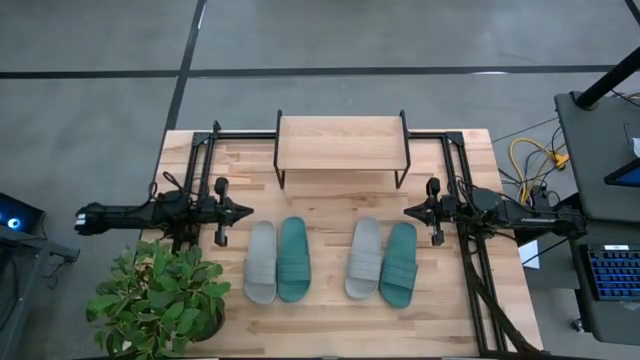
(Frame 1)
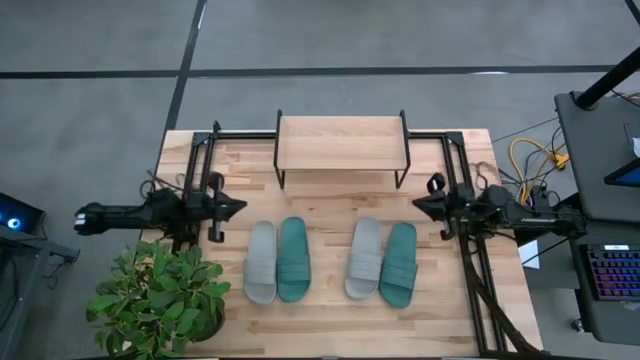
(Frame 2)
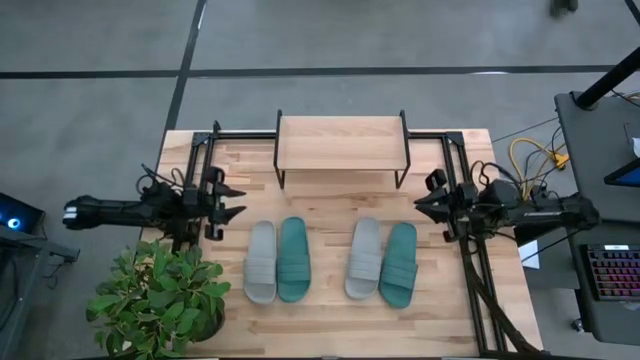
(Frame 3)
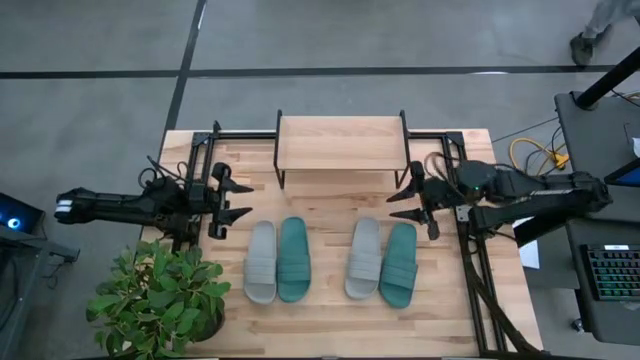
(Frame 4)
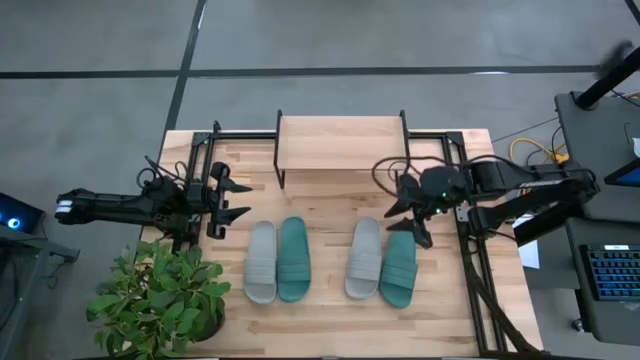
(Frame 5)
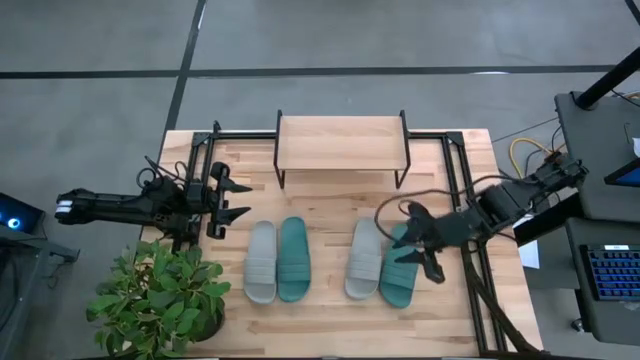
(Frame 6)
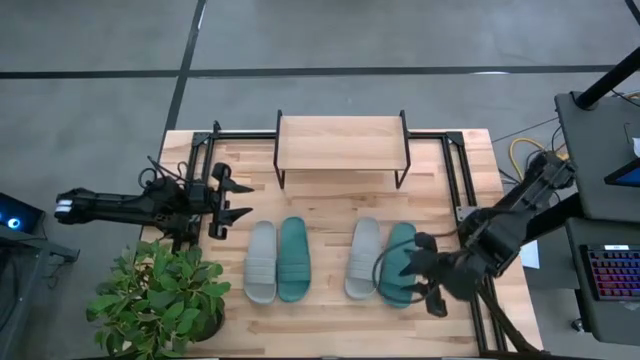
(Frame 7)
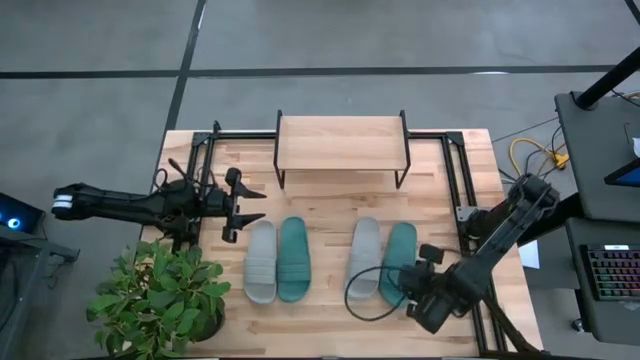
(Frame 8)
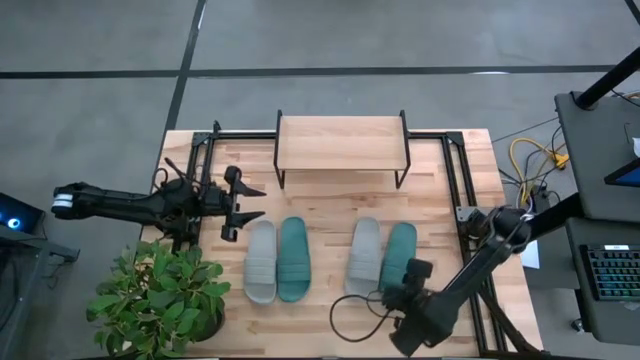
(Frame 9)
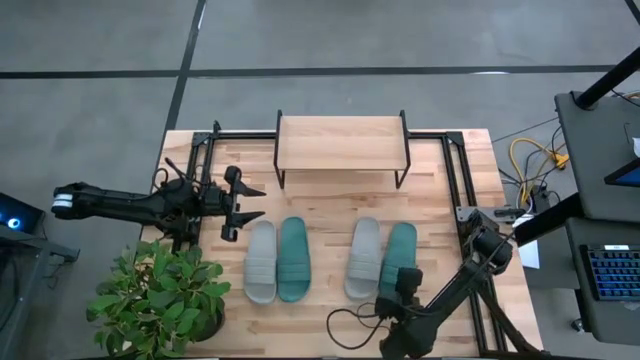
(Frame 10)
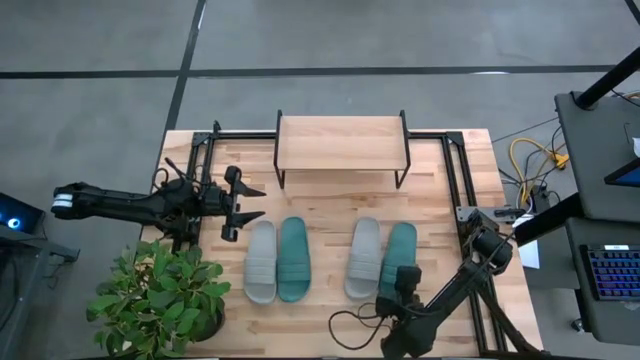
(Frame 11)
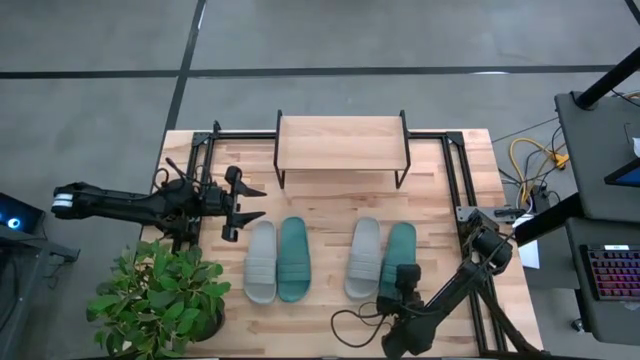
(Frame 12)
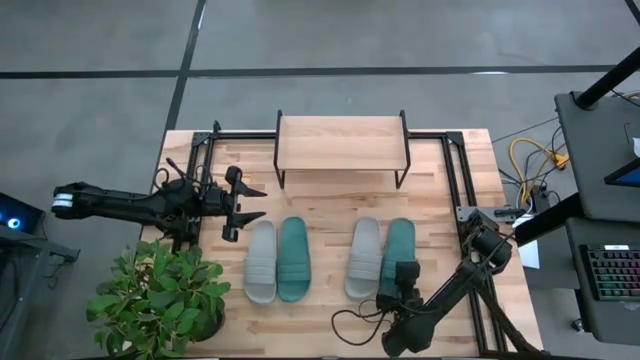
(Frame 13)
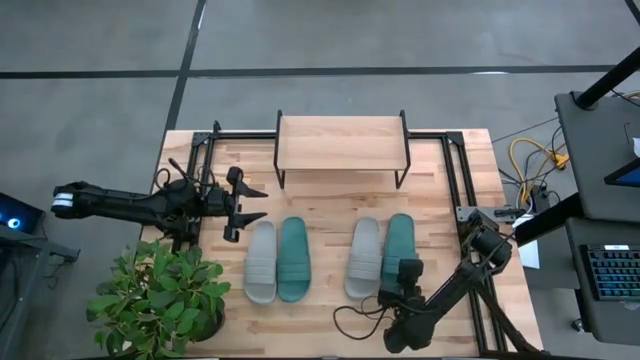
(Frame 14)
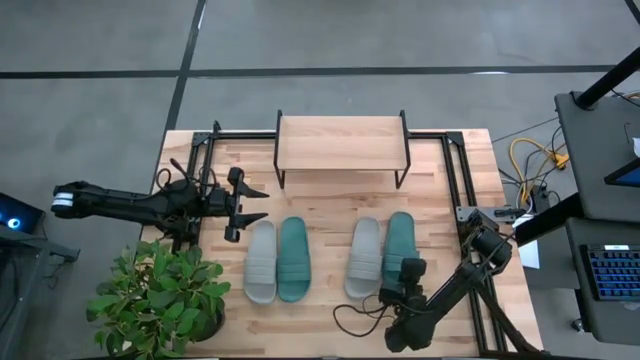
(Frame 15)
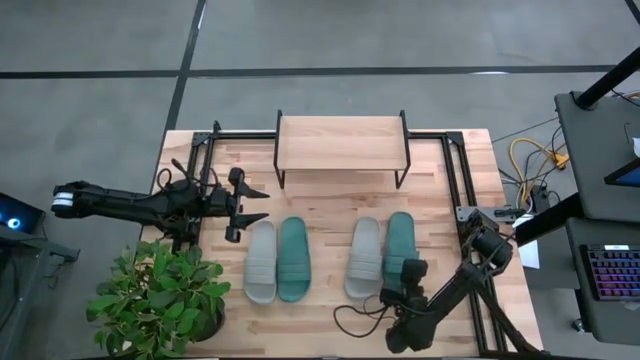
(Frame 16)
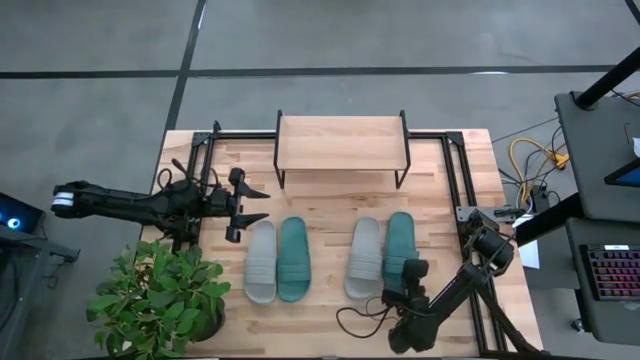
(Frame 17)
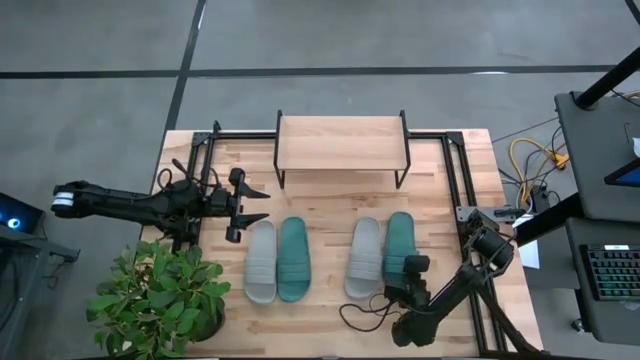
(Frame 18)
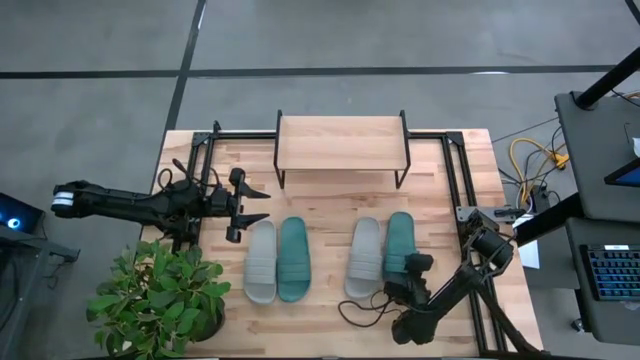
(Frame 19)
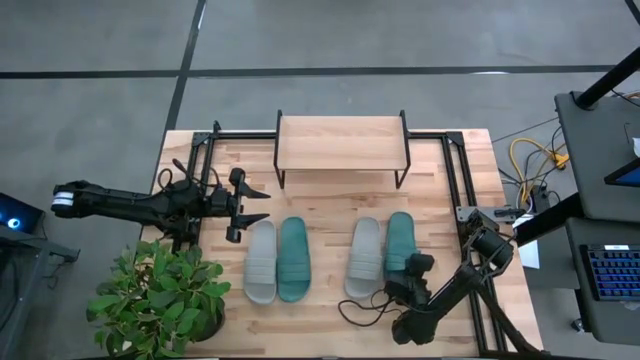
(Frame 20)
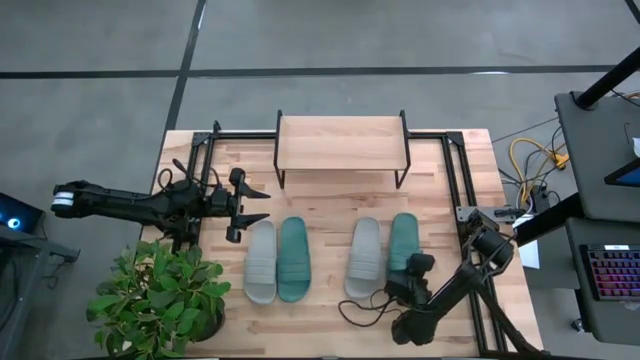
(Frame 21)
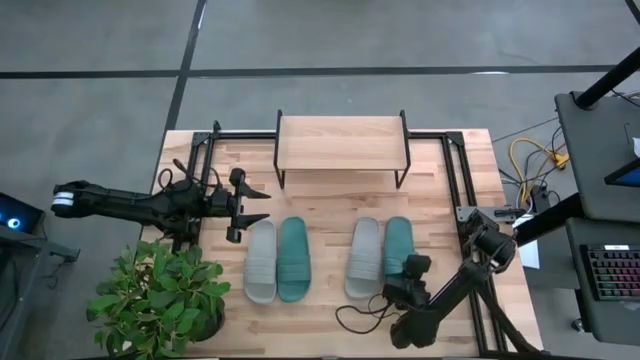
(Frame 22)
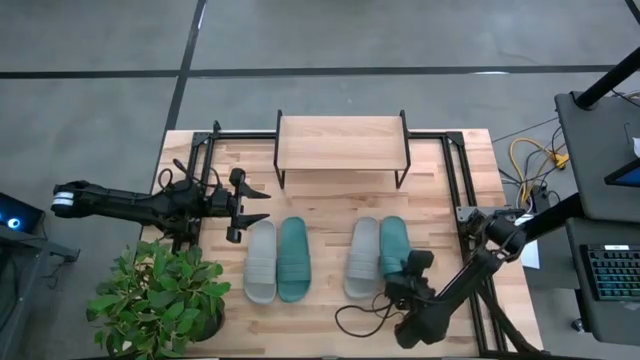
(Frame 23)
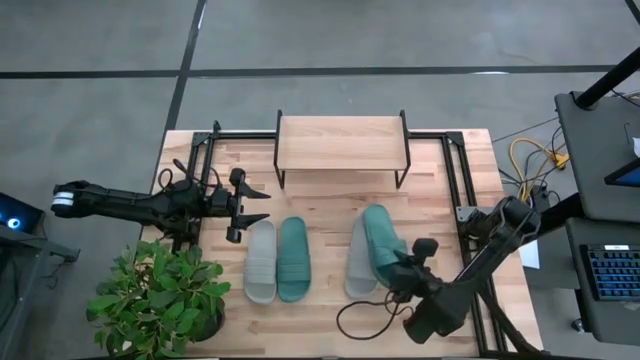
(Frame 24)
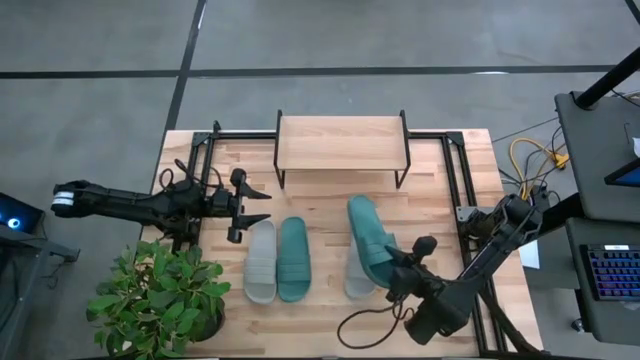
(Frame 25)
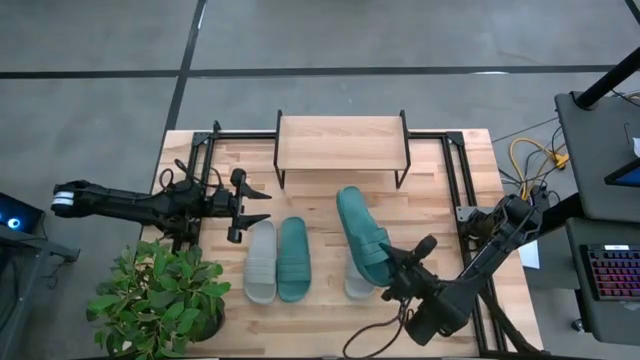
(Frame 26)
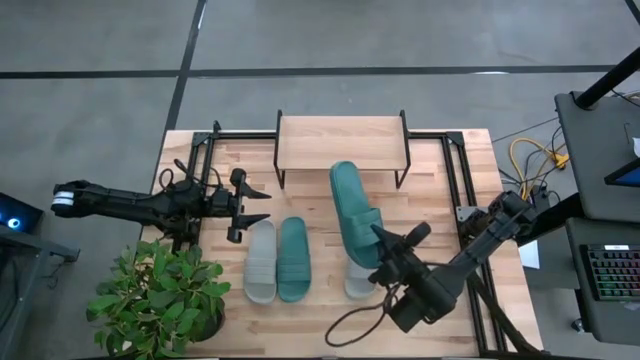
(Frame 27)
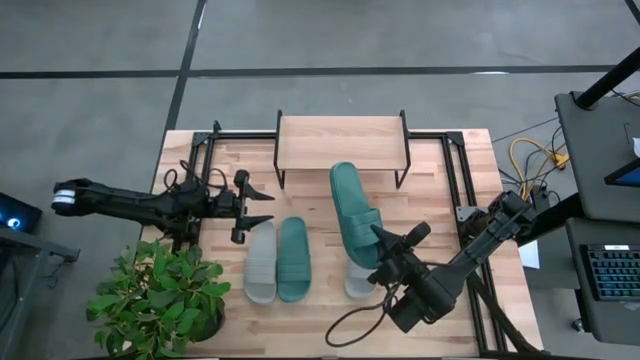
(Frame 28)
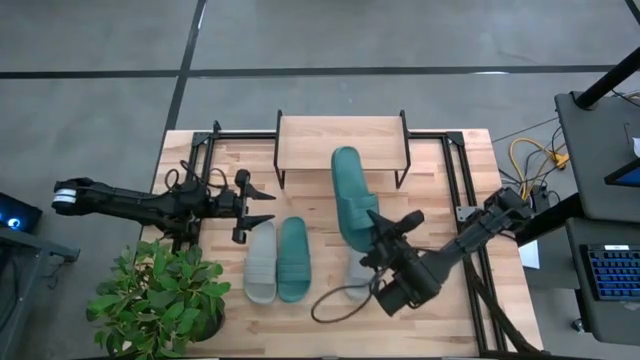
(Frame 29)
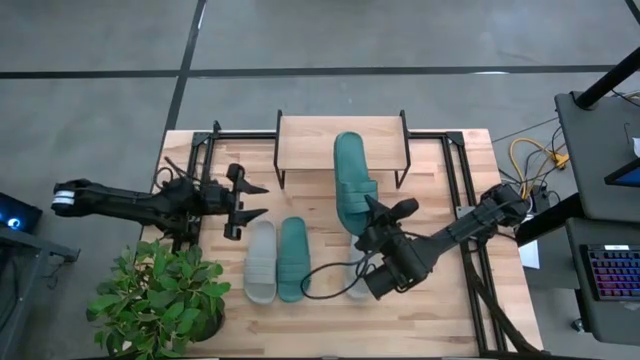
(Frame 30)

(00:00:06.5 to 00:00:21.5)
Task: Pick and place slides into the shelf
Put the right green slide on the shelf

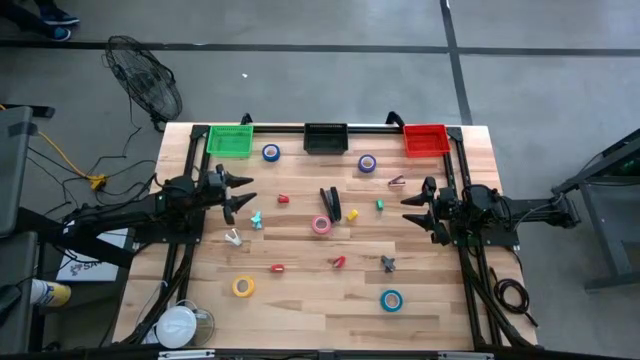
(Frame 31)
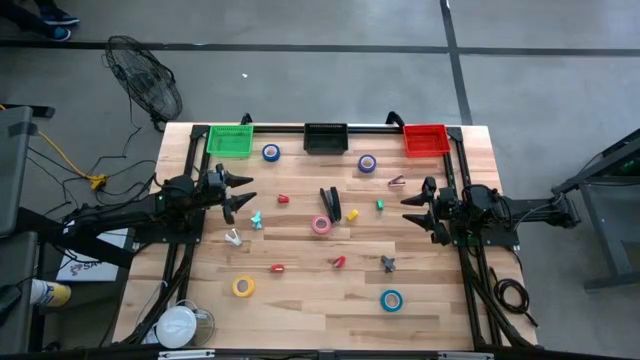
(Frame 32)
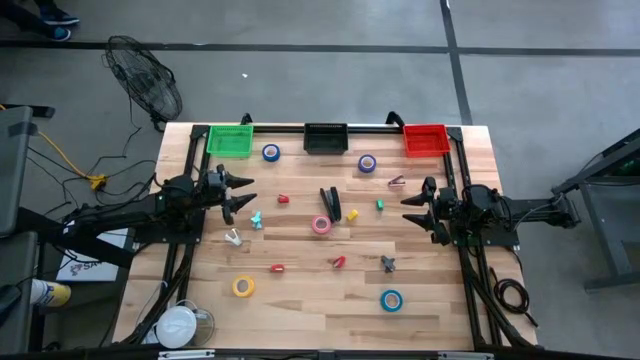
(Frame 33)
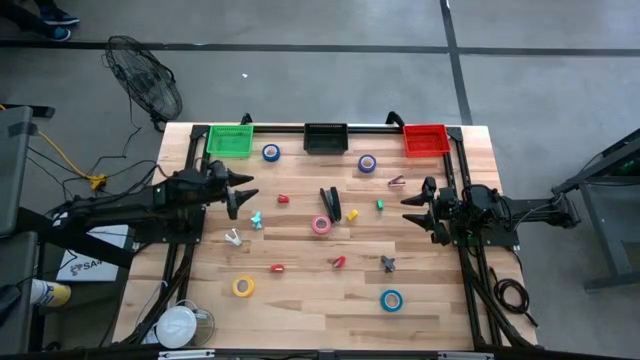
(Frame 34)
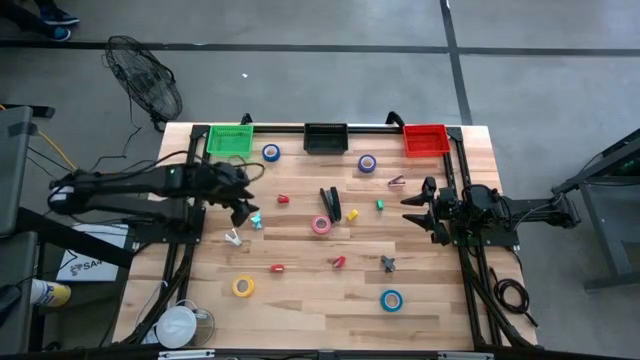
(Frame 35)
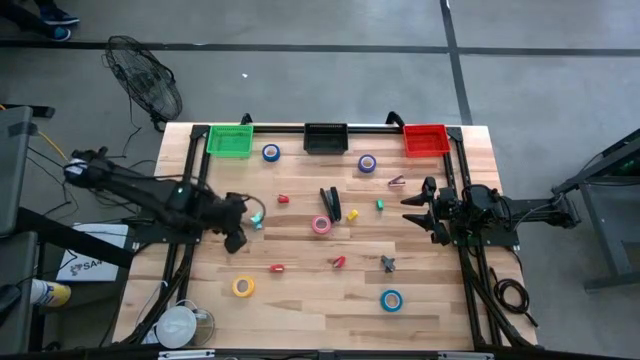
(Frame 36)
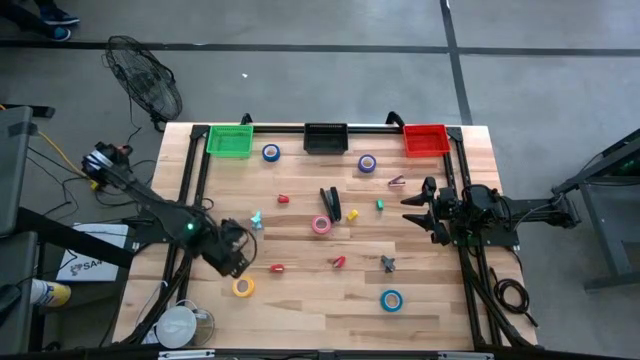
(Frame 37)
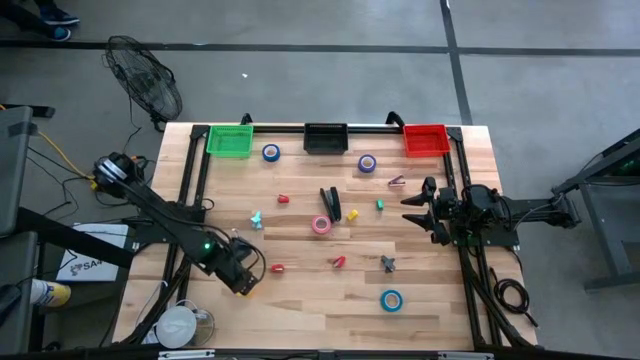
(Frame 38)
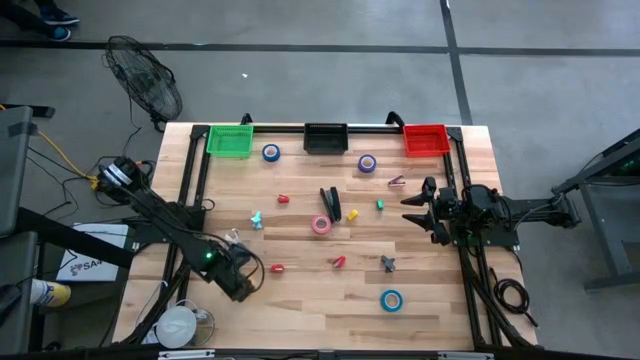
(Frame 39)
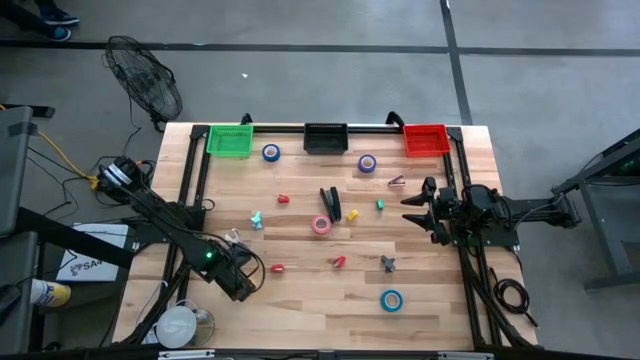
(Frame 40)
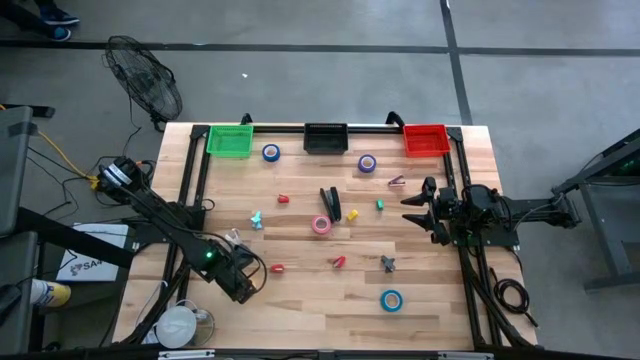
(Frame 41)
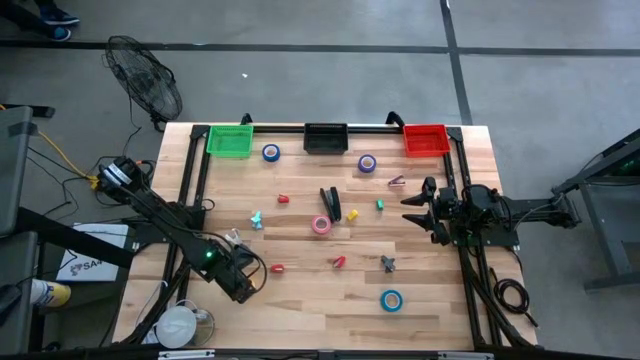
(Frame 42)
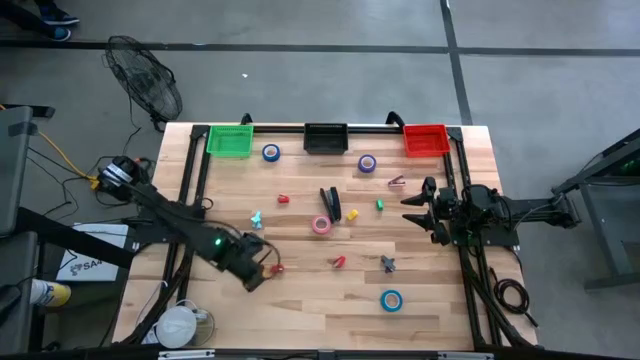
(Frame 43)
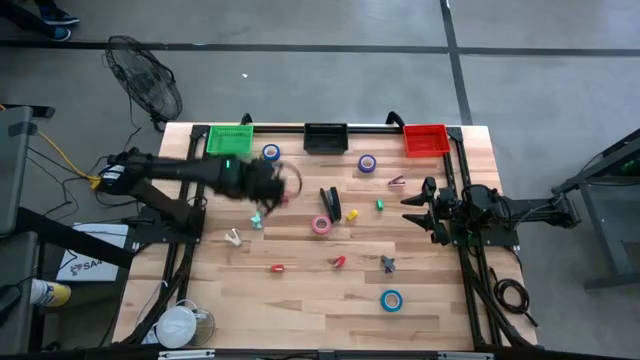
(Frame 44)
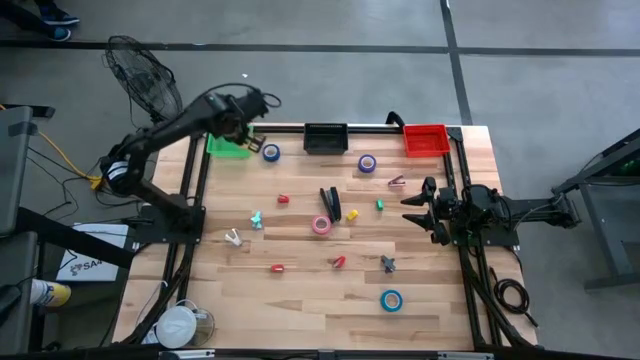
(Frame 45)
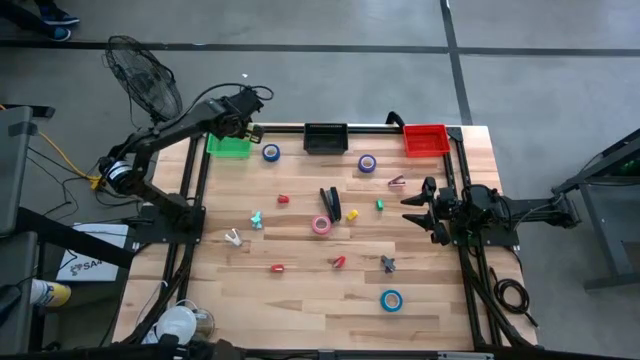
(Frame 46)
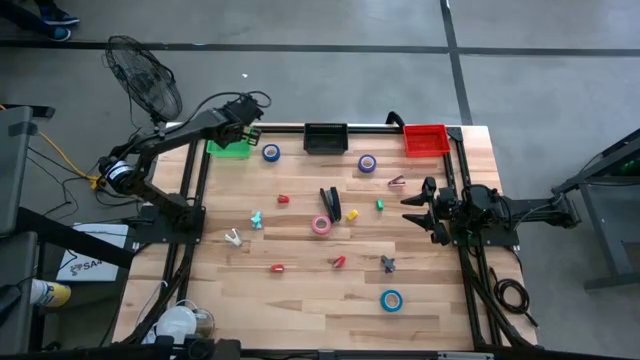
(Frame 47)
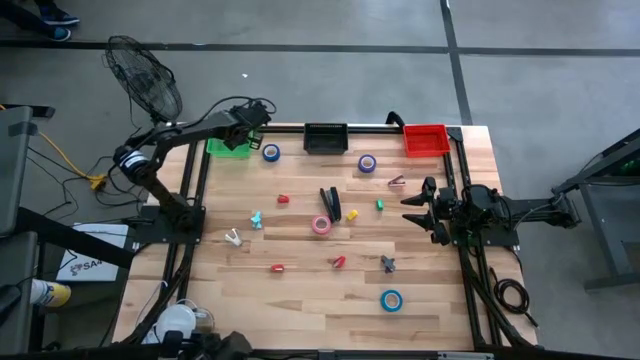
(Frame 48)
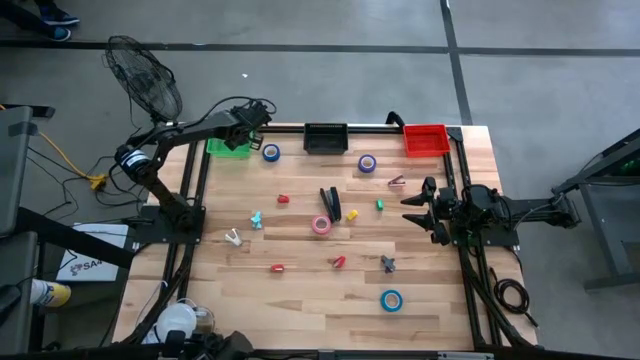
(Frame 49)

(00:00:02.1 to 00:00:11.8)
Task: Pick and place Stapler, Stapler remover, tape
Put the yellow tape in the green bin
